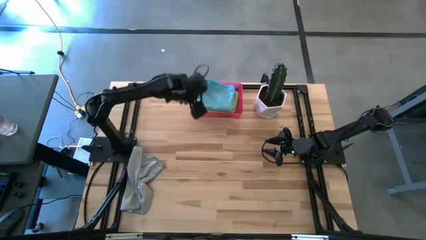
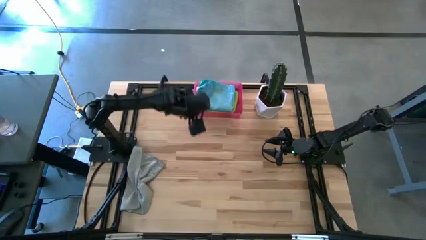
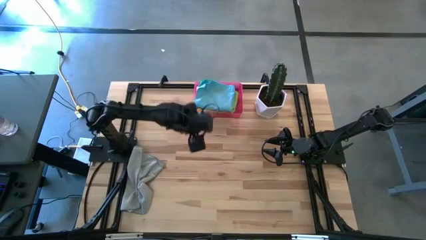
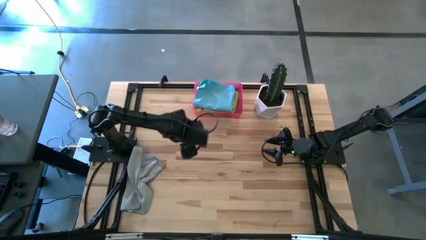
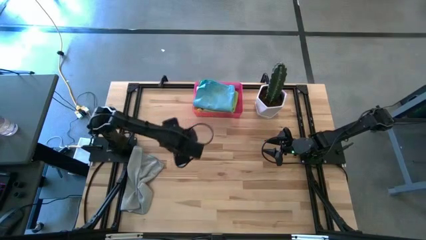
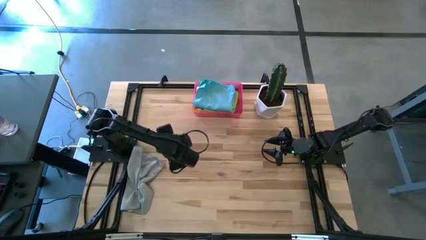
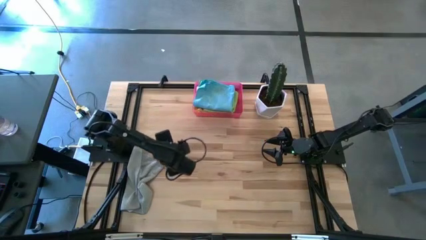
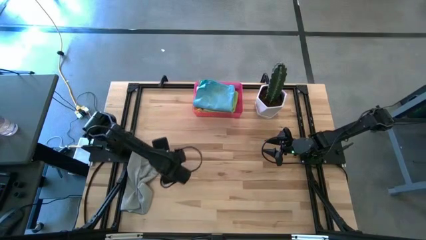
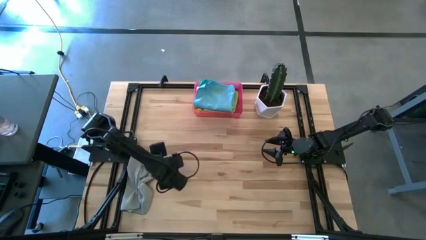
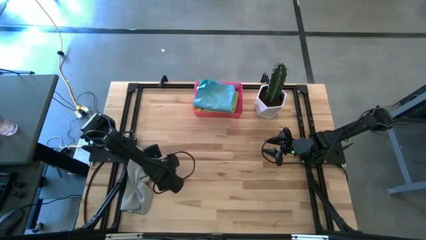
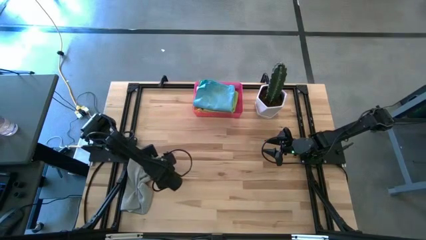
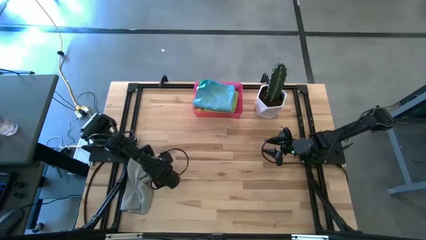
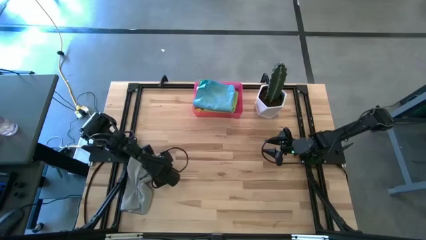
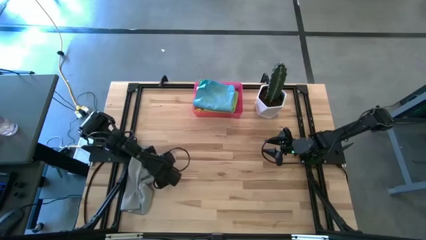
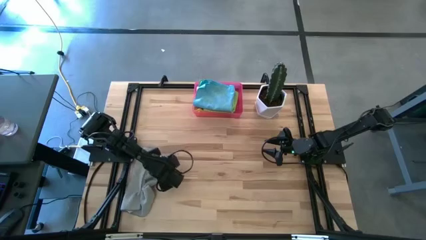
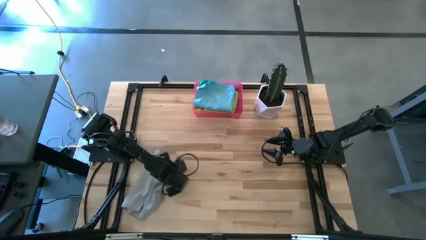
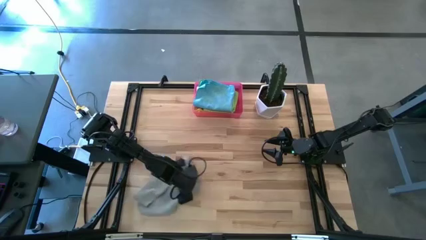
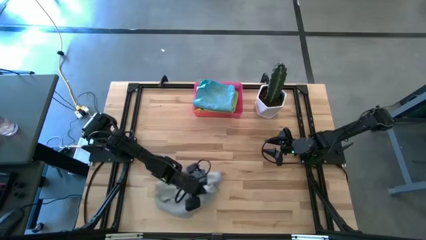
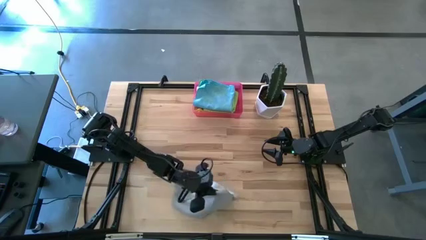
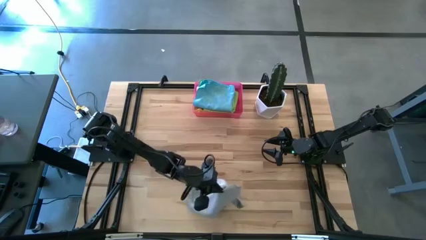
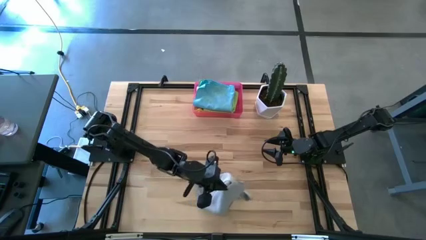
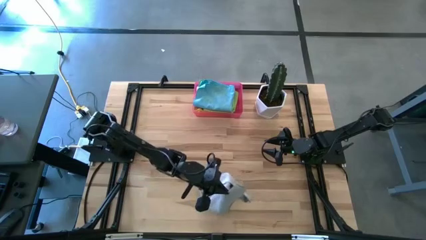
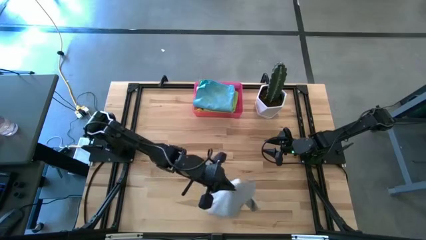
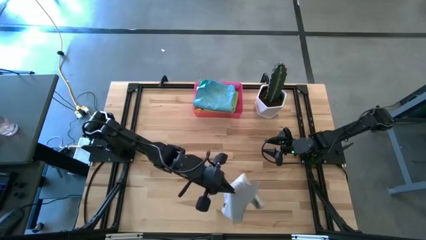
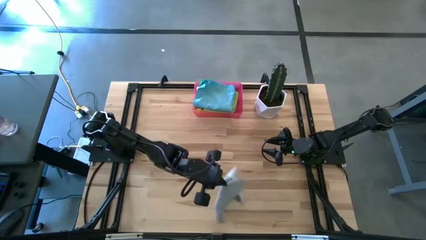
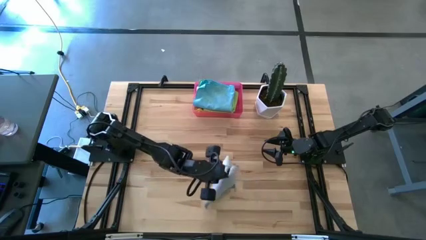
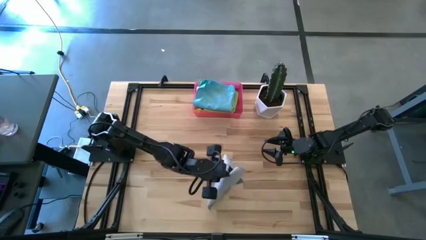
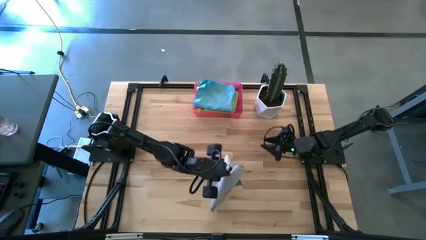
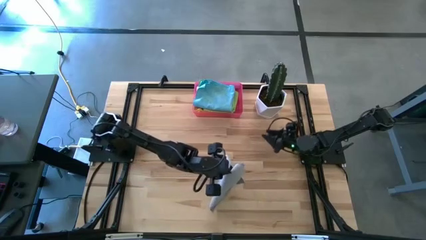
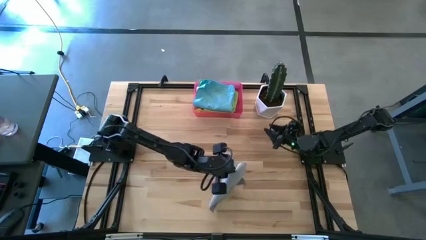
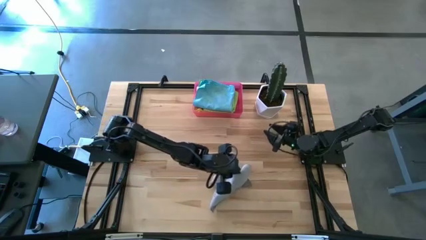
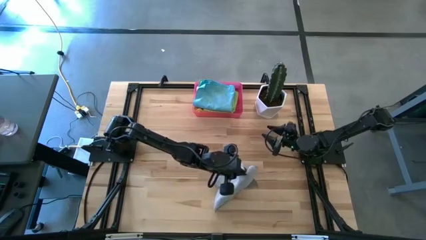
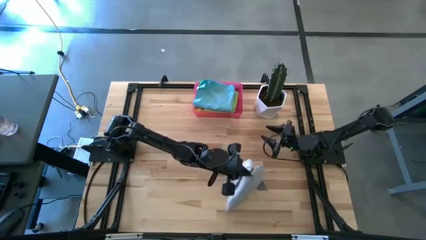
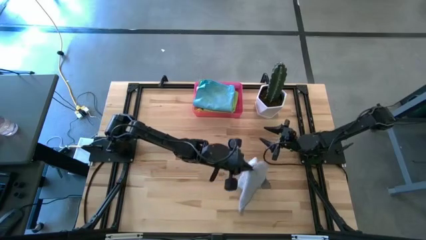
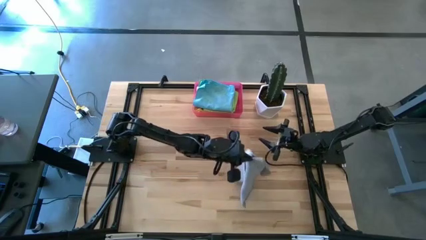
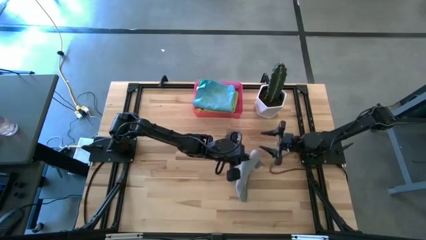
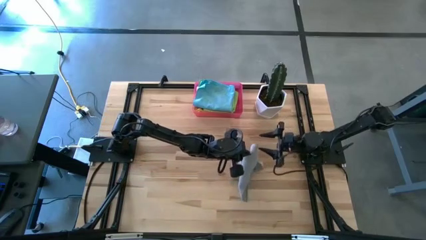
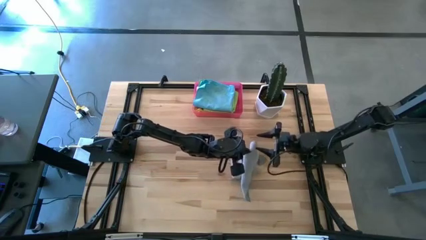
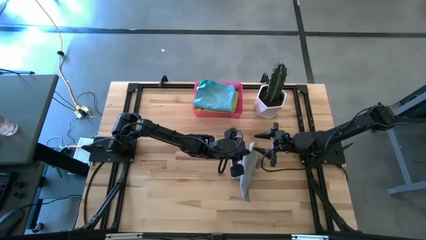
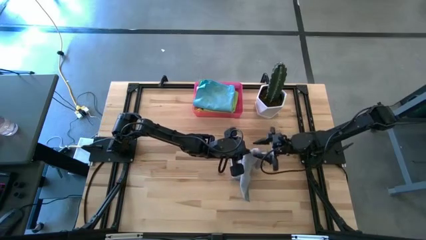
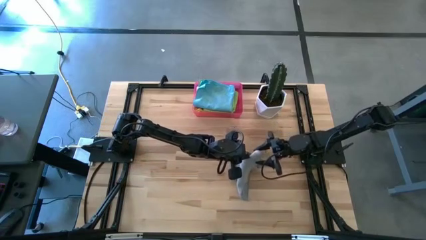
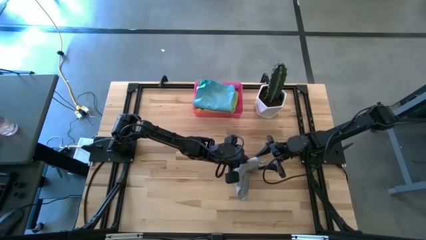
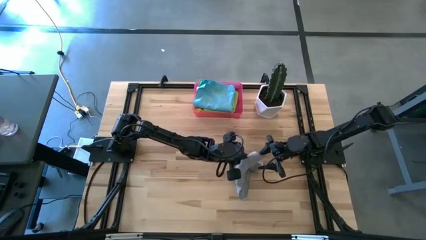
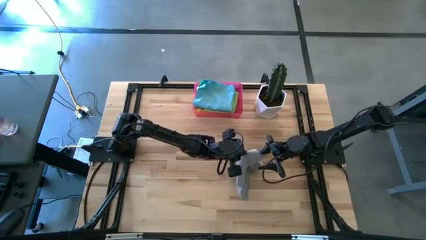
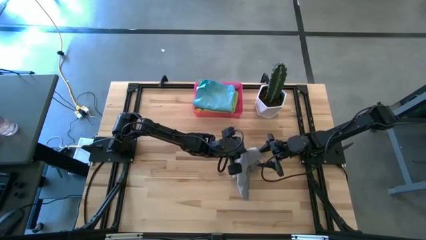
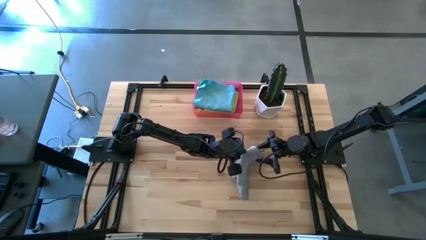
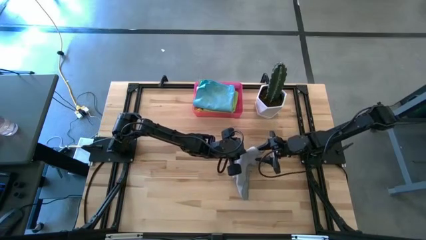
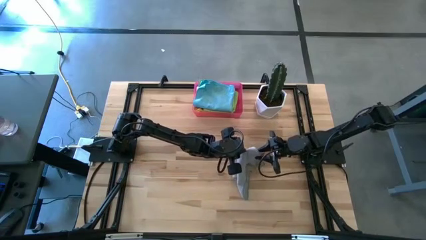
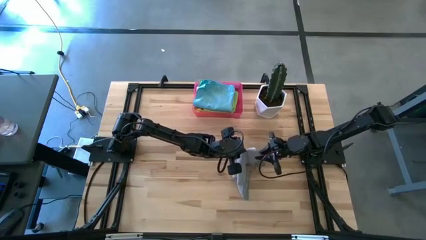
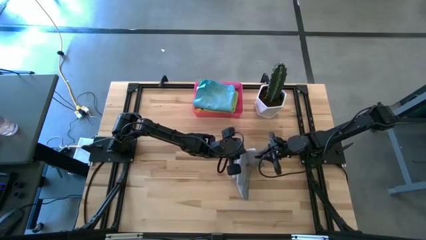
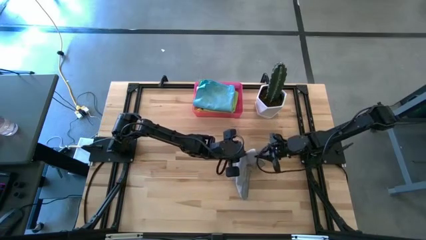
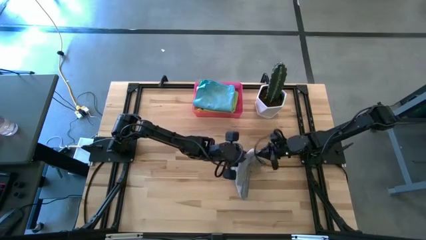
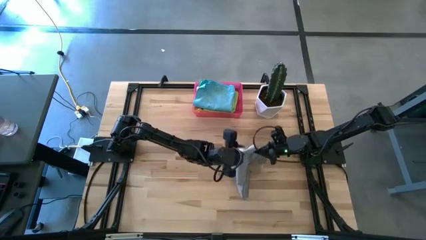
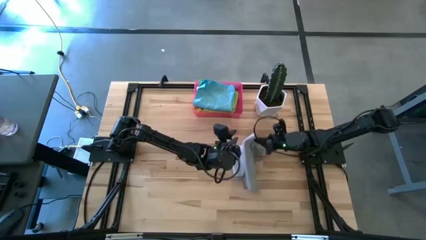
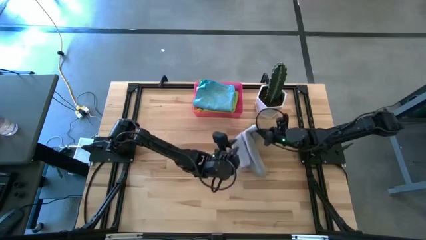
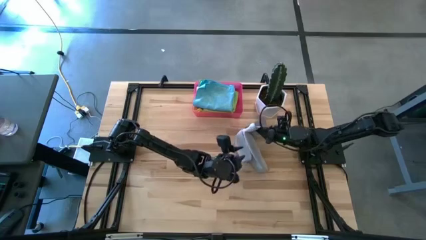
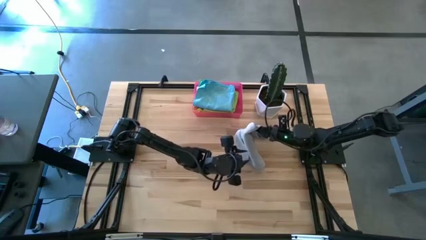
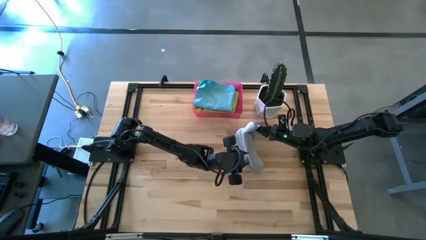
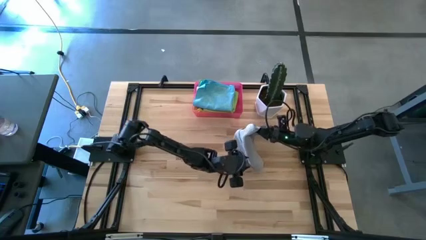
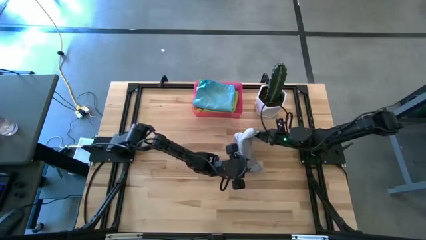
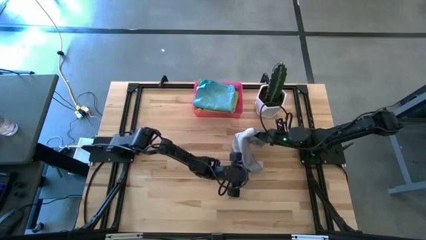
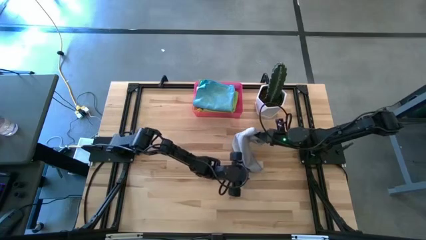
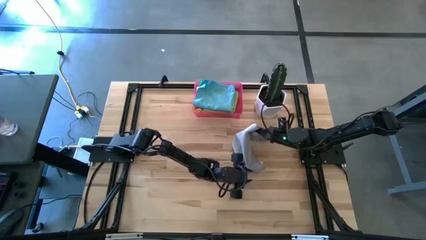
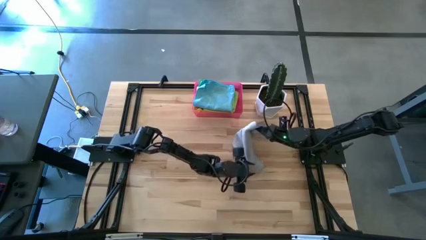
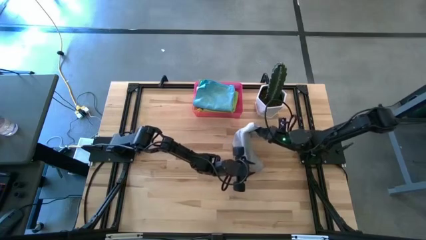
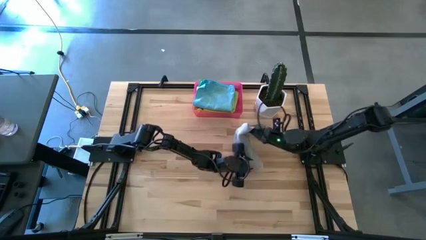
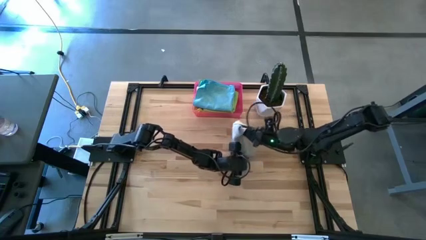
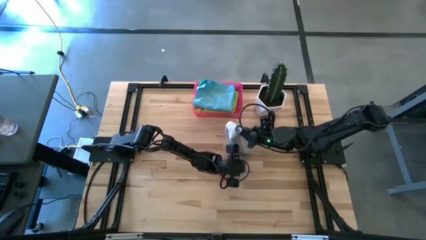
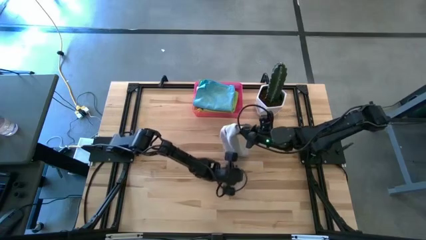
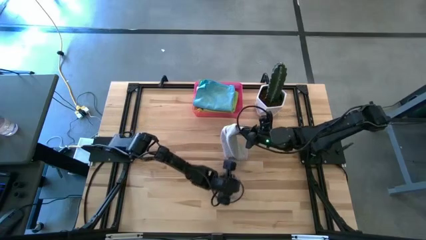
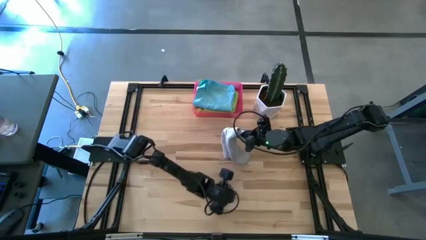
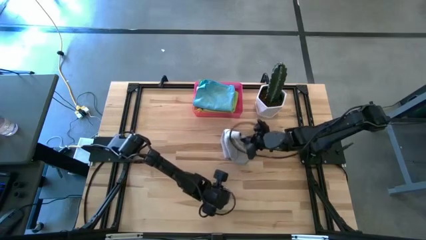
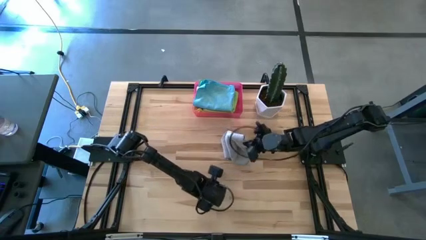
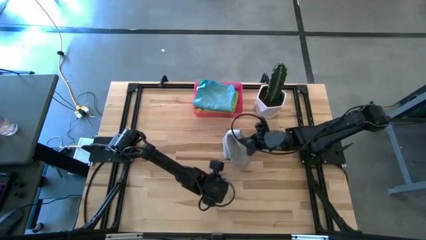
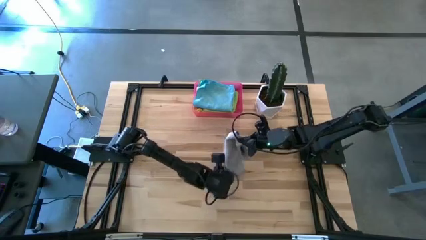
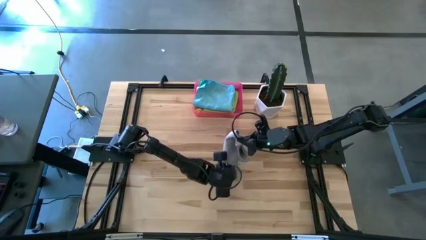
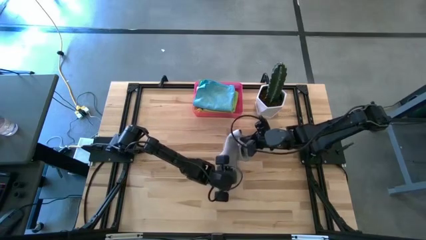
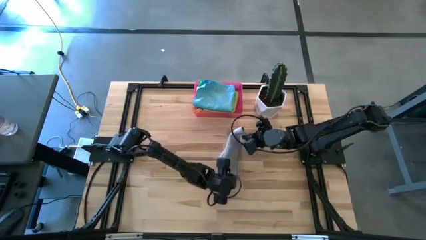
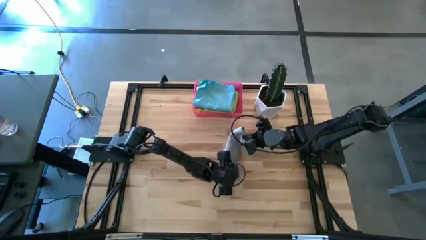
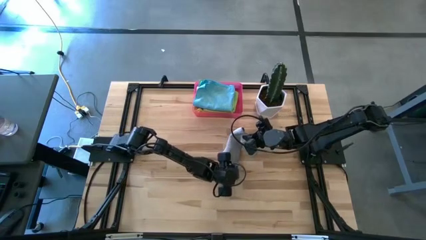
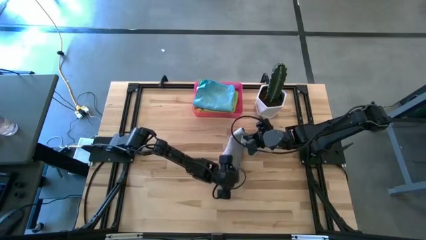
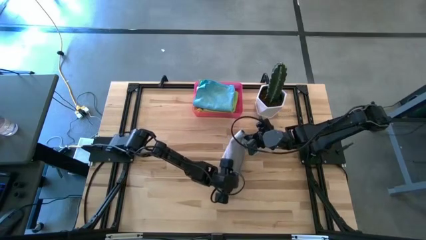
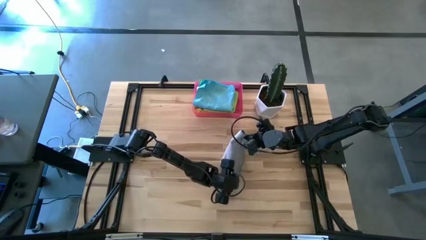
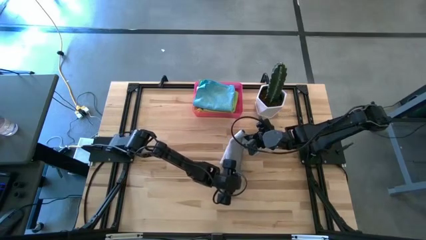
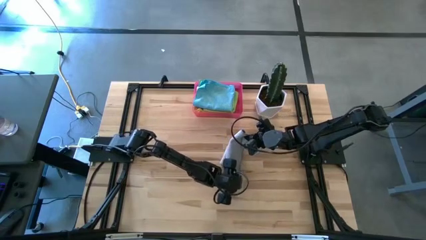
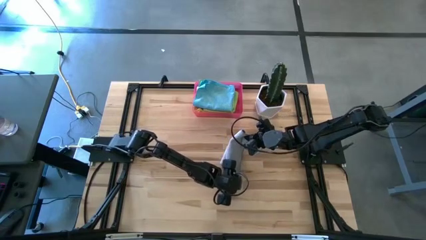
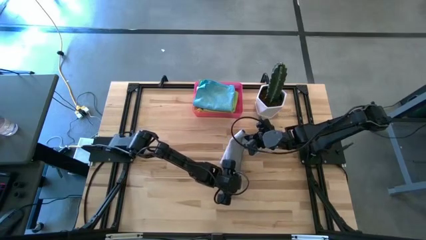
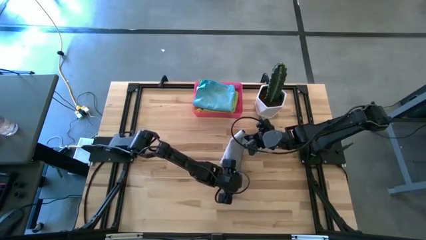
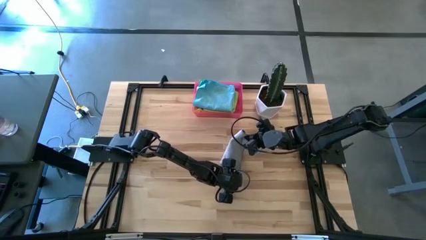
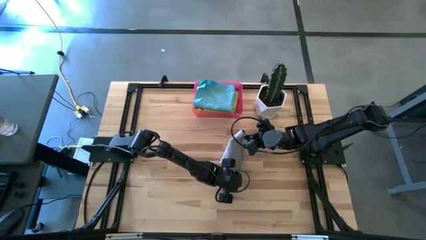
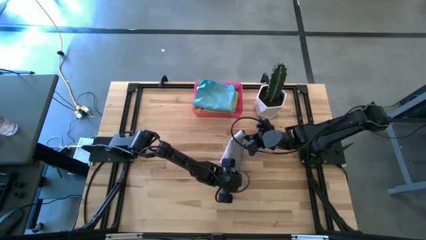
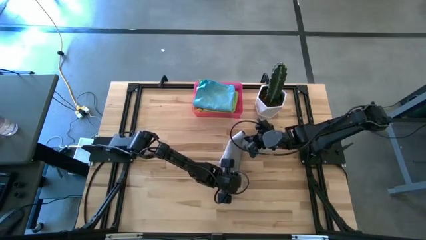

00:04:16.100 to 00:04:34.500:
Task: Fold microfiber towels
Fold the gray microfiber cloth on the table
